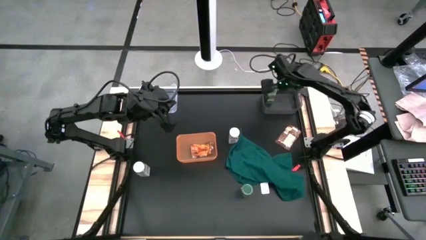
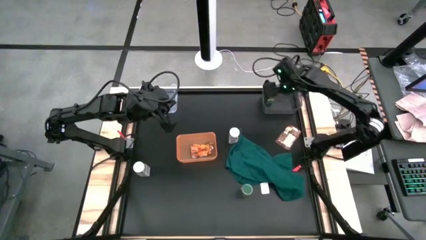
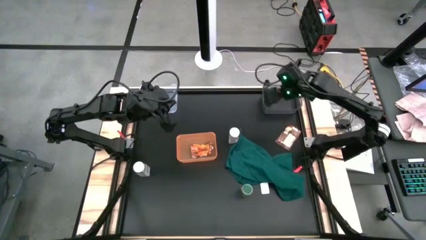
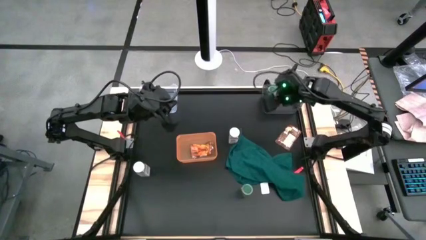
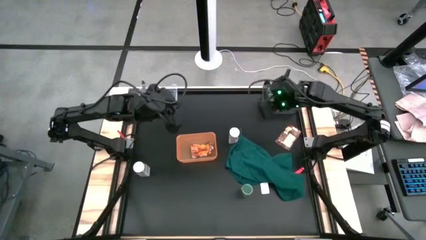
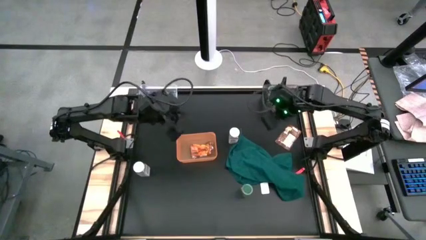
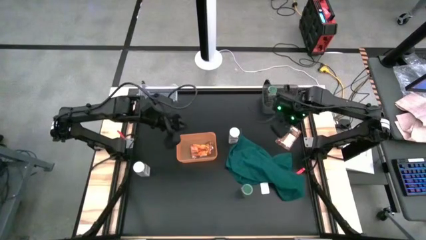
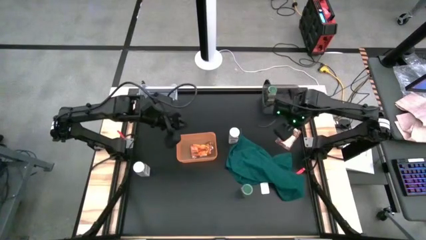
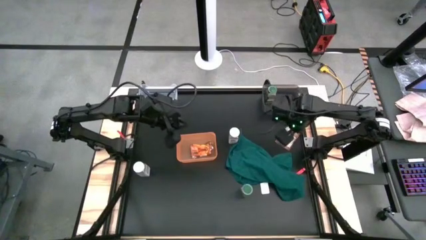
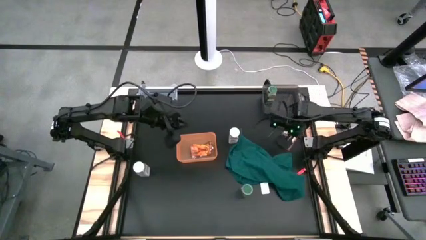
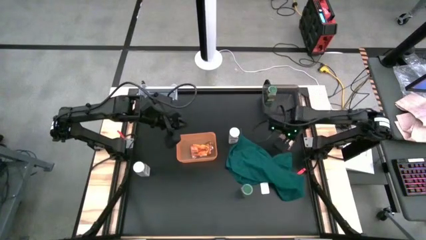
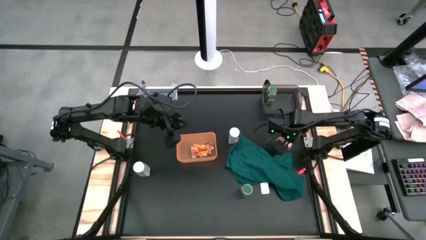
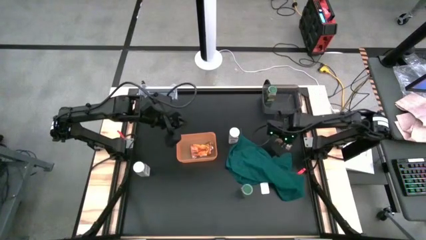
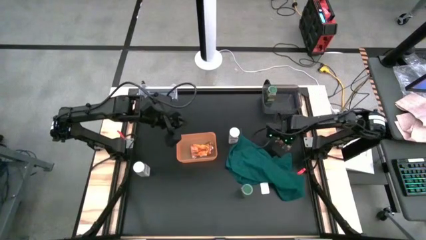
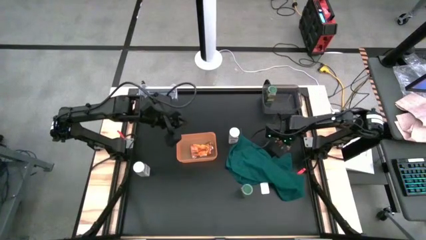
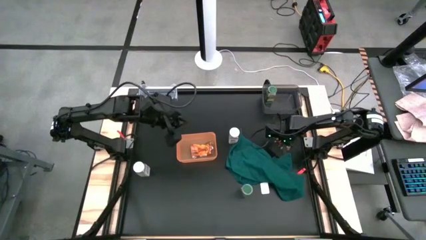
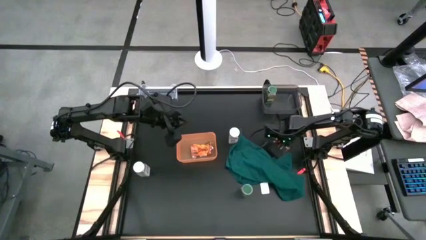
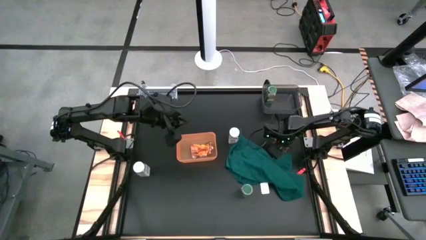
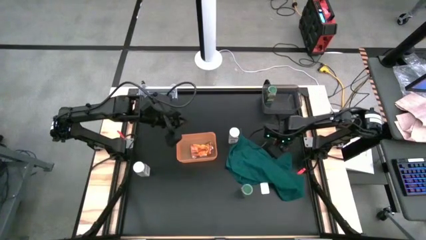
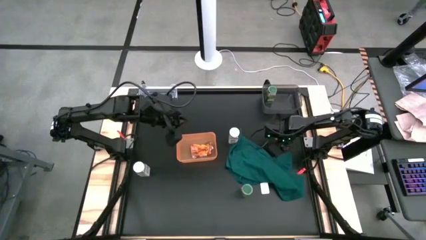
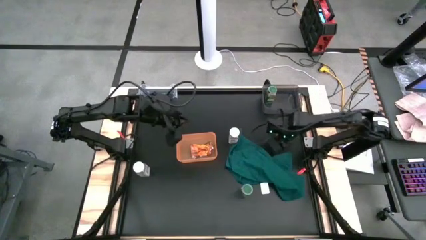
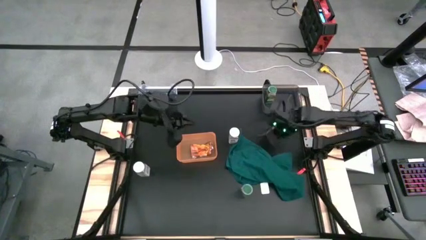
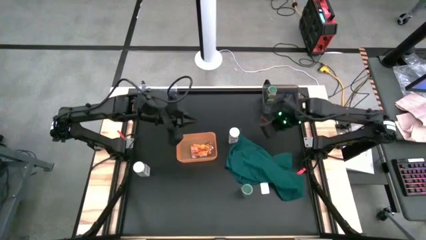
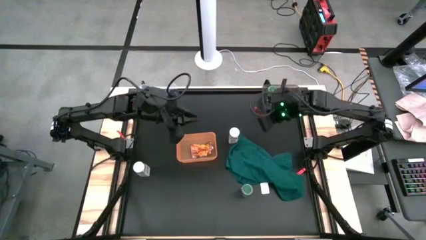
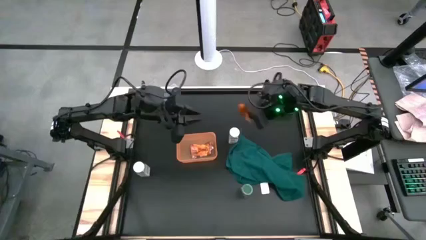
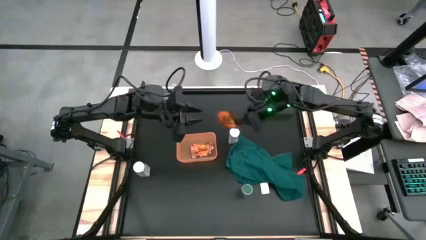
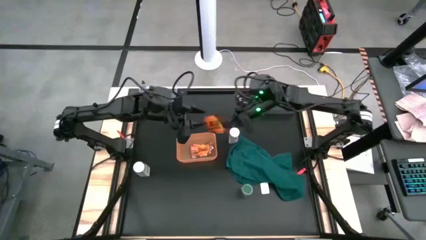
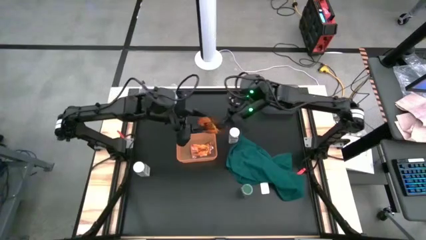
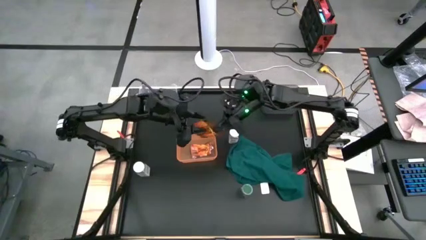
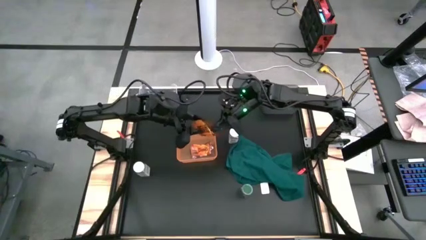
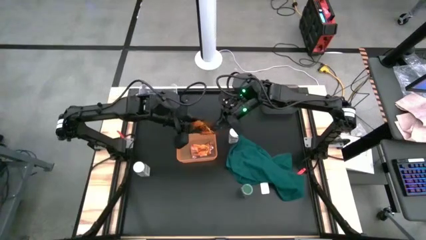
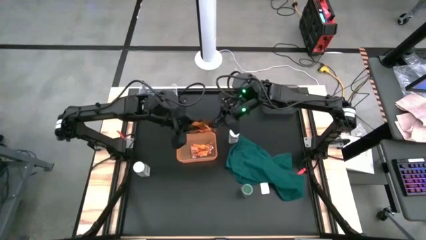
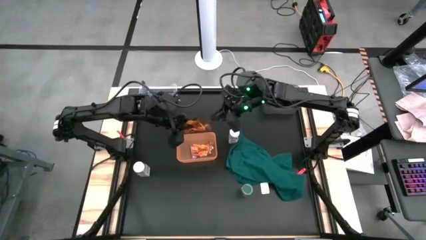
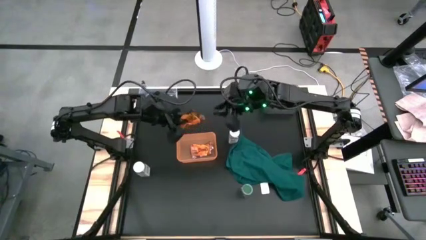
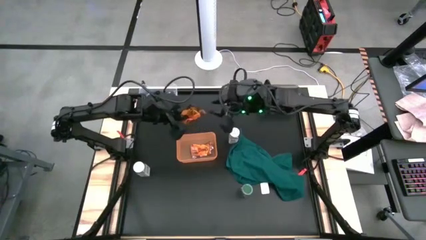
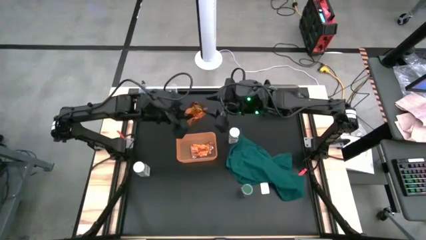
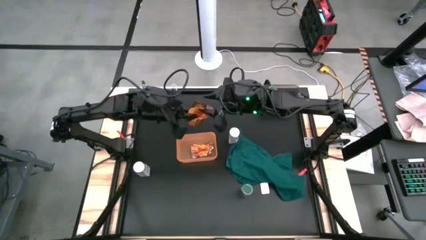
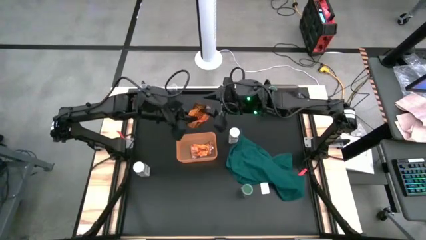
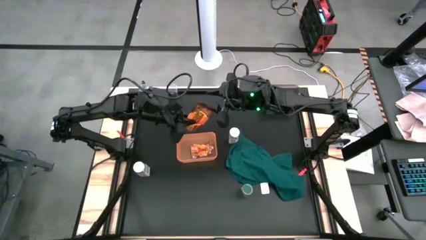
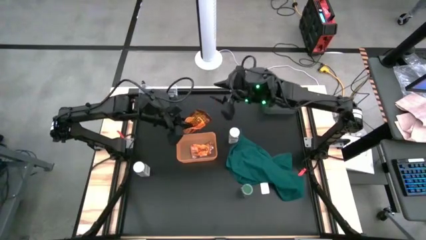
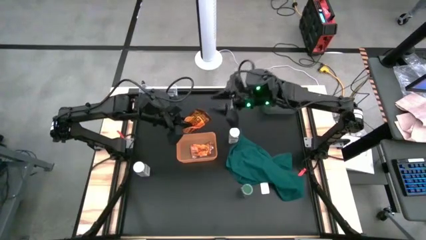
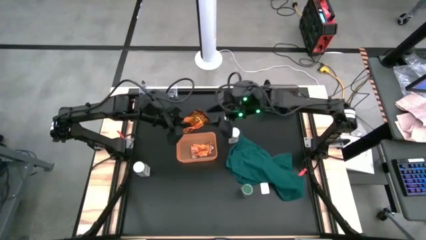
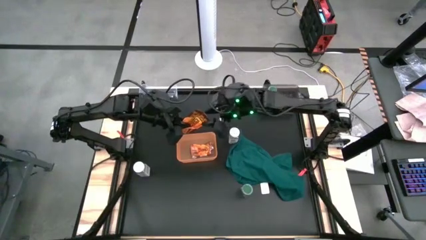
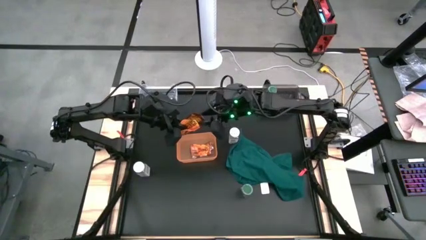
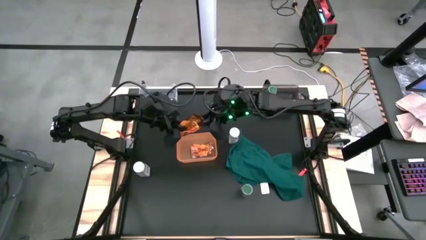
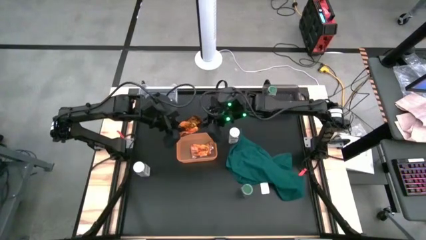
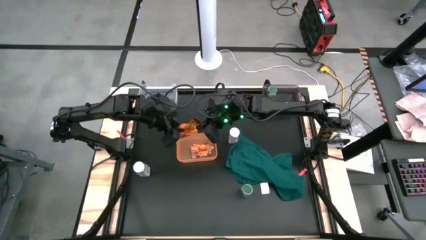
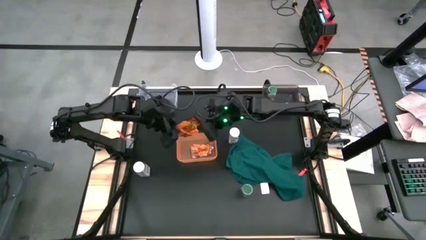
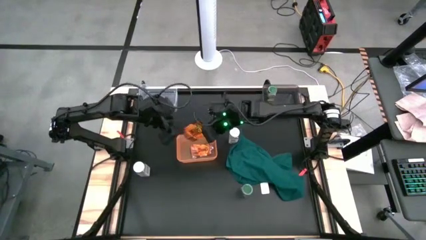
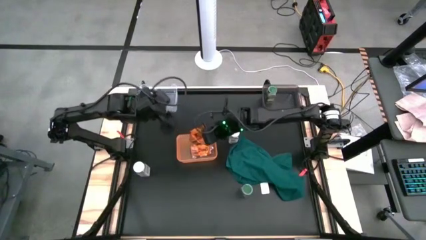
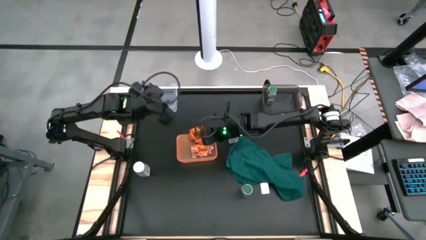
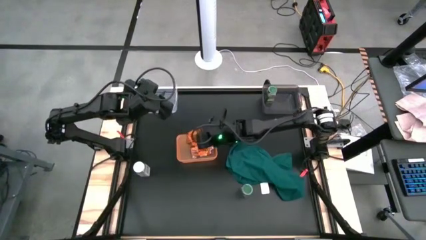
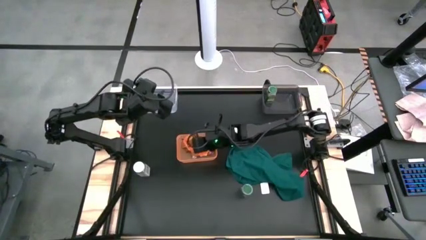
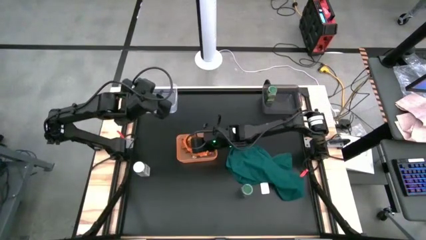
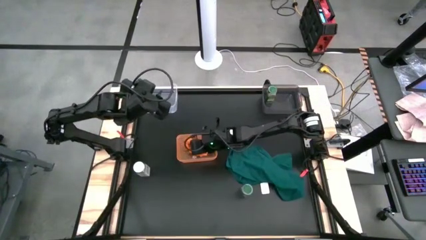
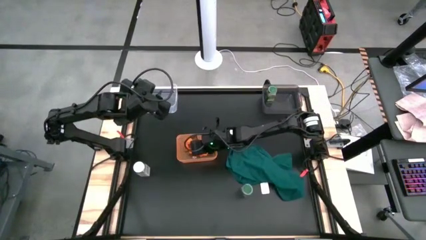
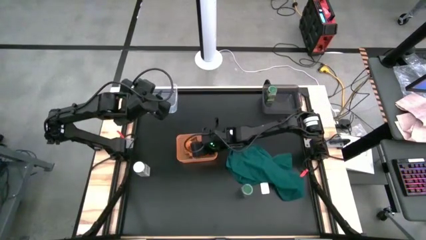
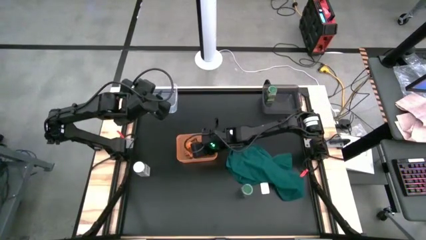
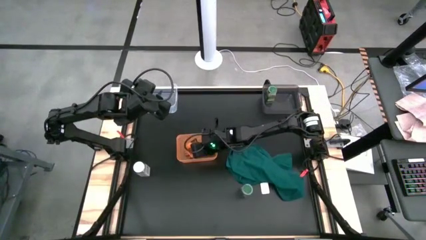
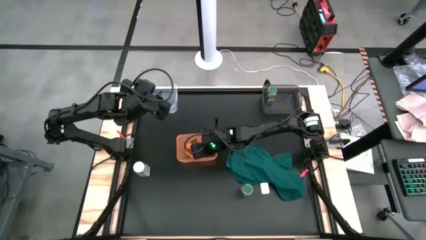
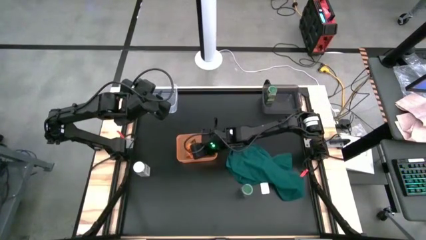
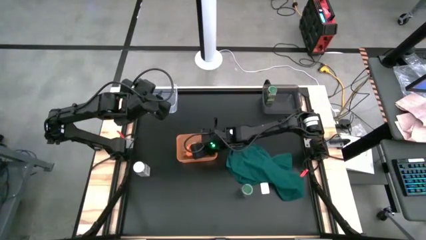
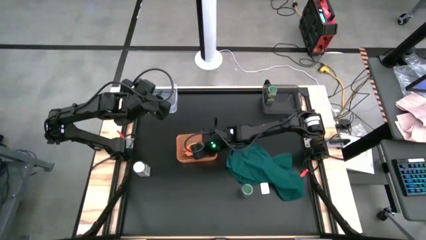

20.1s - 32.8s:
Task: Sort spices by type
Put the orange seasoning pack into the orange bin

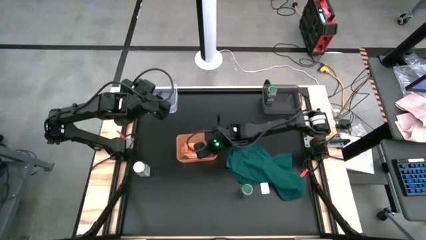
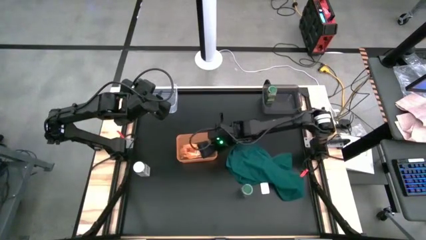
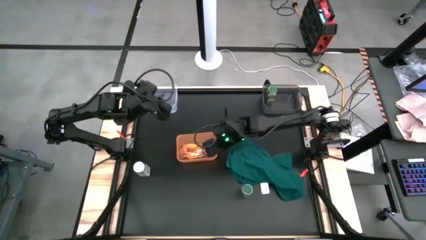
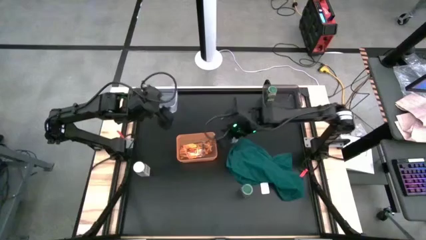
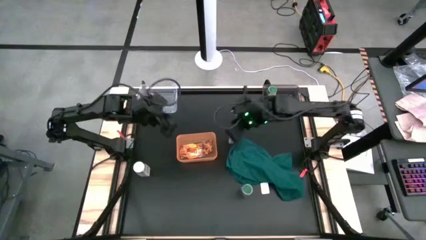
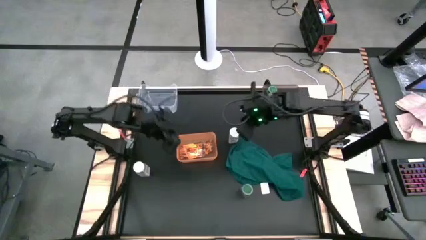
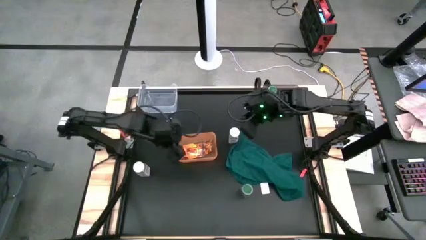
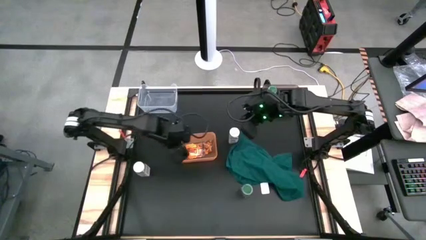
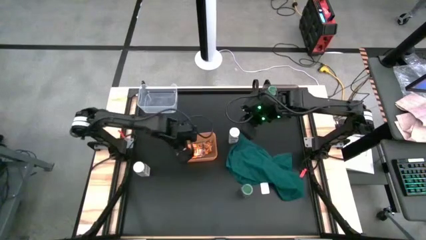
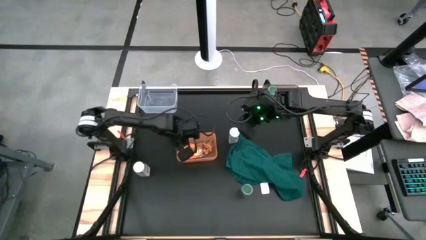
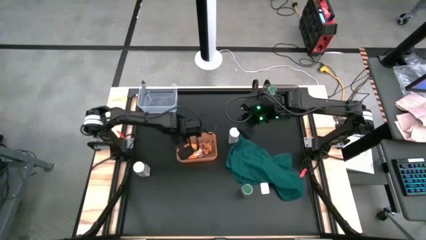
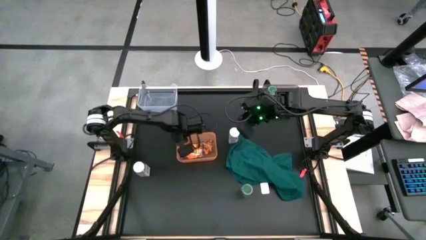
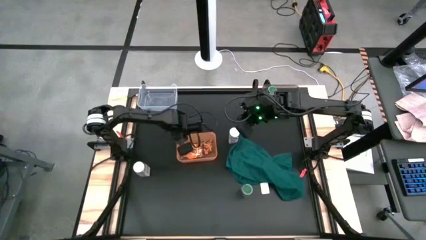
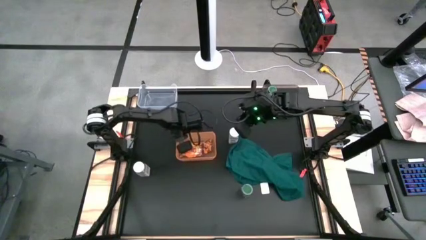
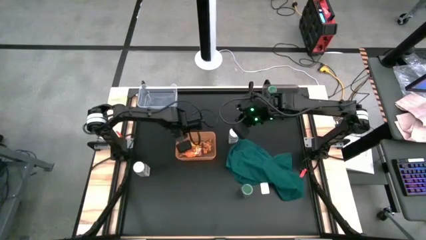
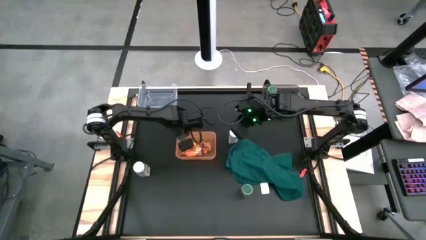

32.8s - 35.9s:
Adjust the orange bin

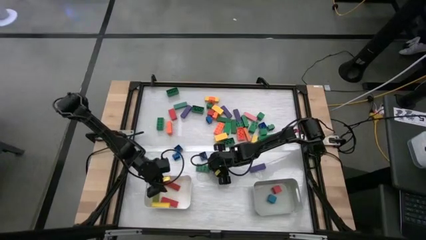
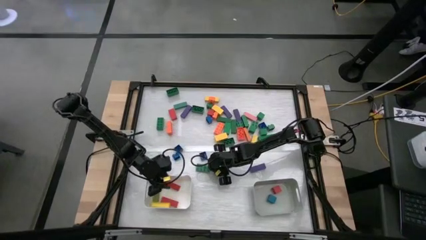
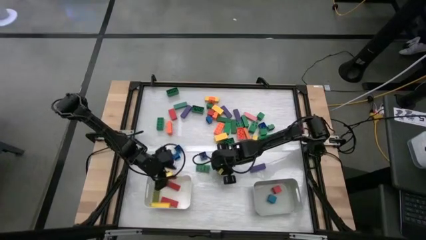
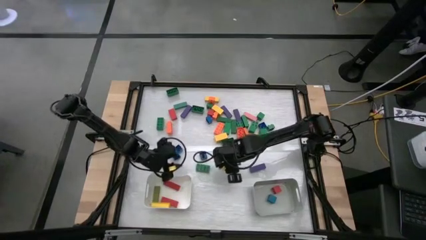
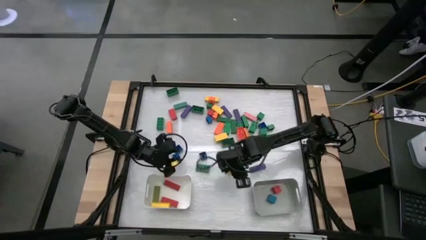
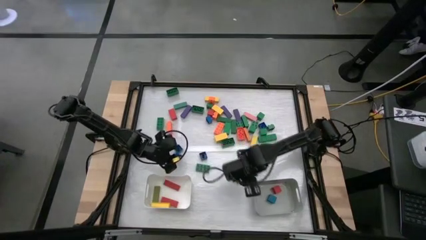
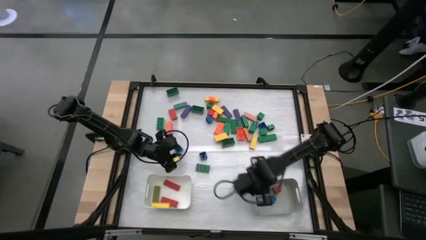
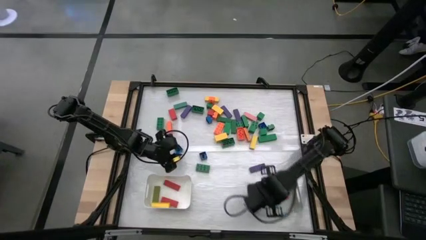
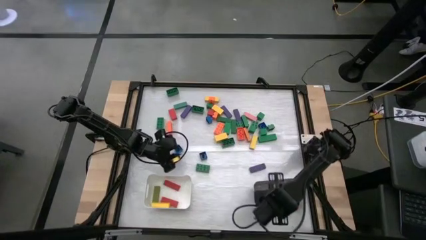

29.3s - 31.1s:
Task: Sort blocks by size
Put the square blue game piece into the gray bin
